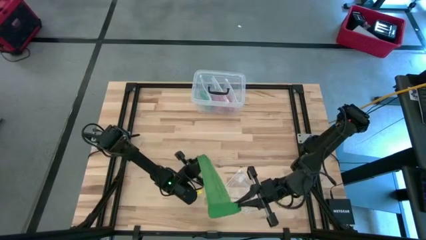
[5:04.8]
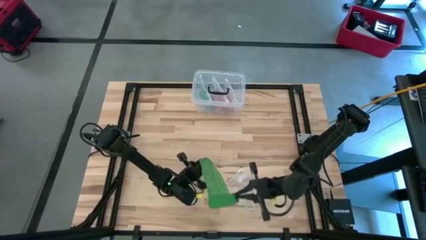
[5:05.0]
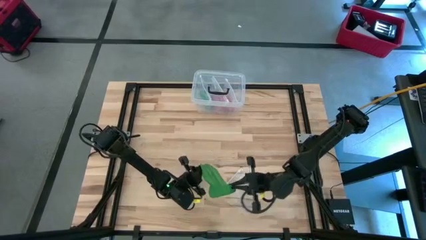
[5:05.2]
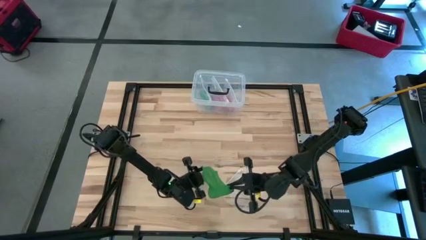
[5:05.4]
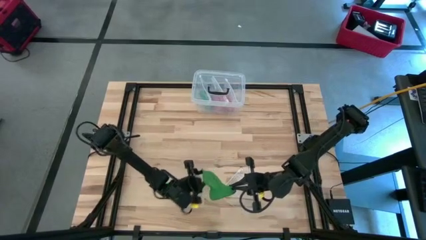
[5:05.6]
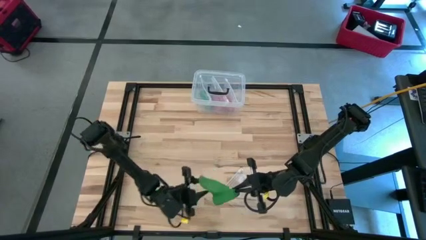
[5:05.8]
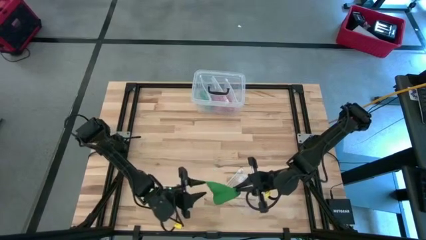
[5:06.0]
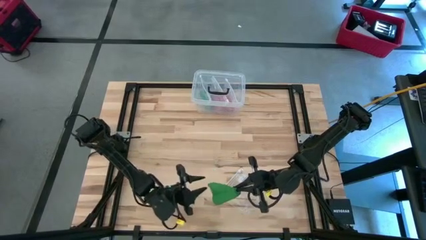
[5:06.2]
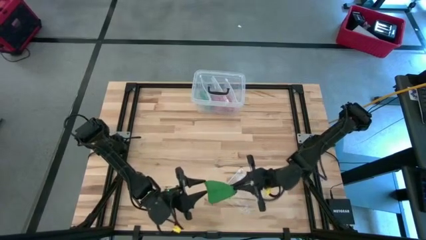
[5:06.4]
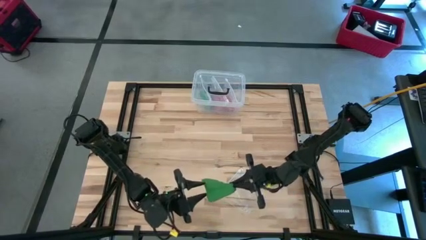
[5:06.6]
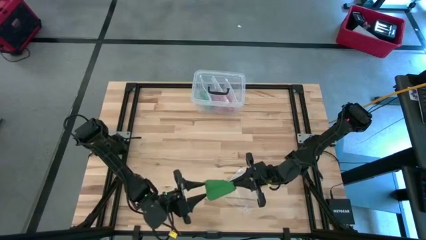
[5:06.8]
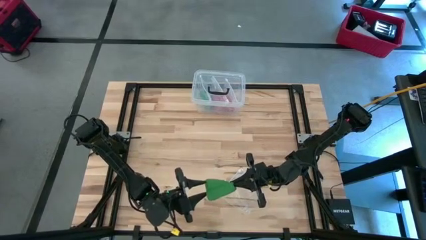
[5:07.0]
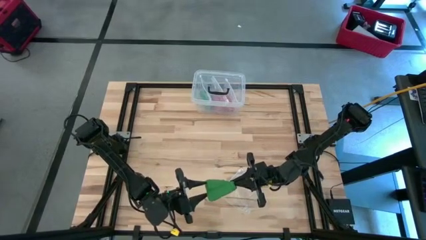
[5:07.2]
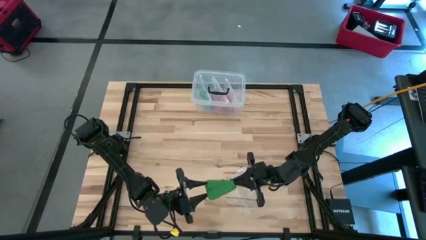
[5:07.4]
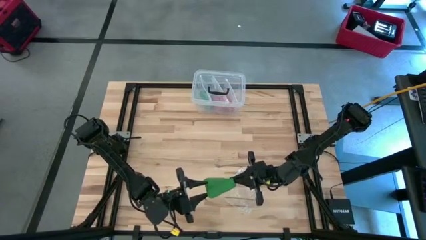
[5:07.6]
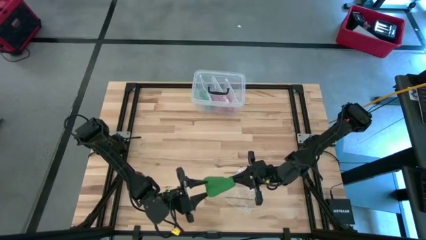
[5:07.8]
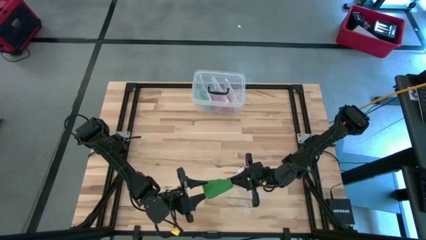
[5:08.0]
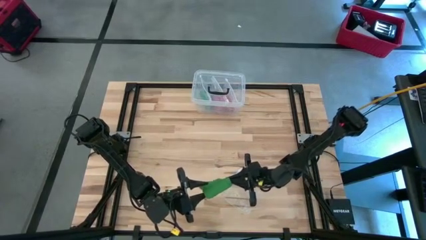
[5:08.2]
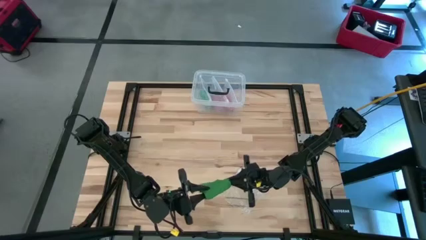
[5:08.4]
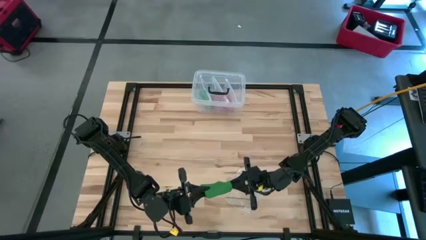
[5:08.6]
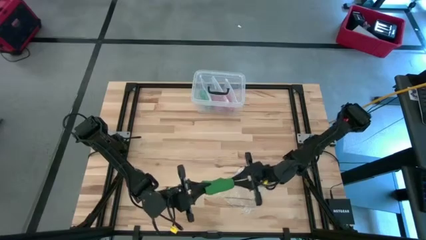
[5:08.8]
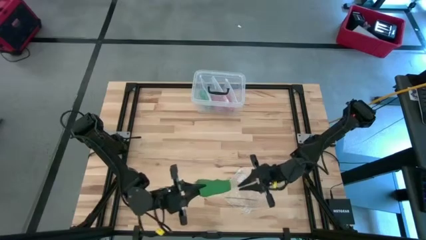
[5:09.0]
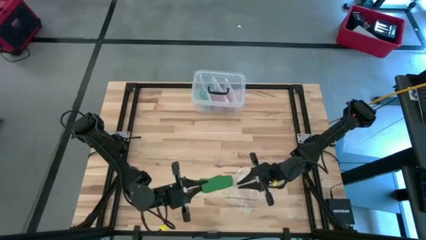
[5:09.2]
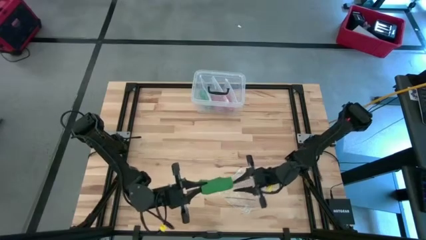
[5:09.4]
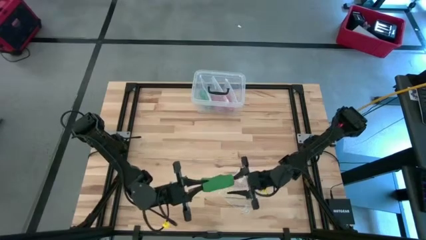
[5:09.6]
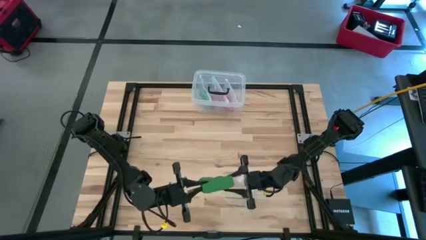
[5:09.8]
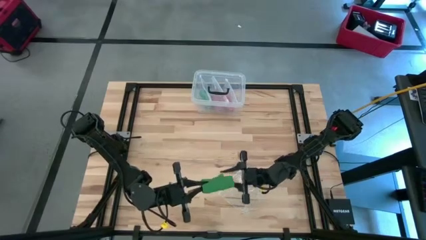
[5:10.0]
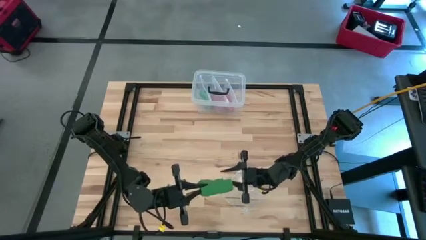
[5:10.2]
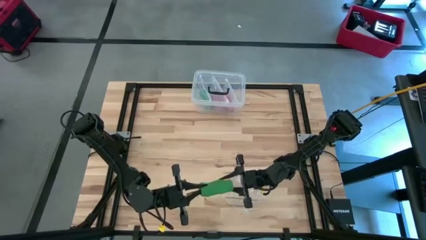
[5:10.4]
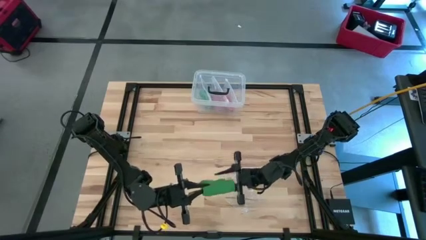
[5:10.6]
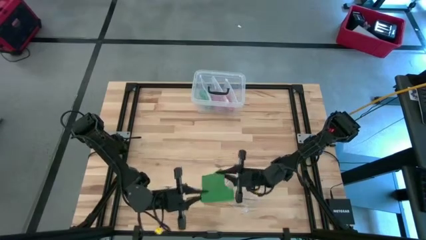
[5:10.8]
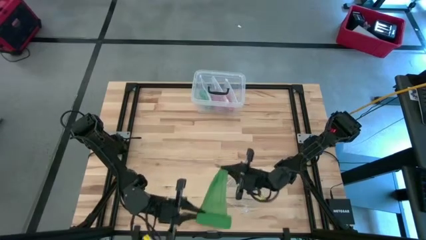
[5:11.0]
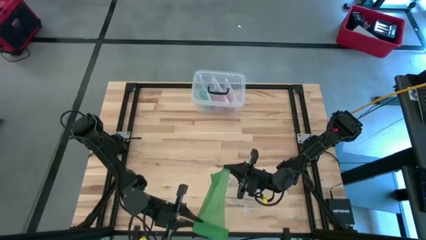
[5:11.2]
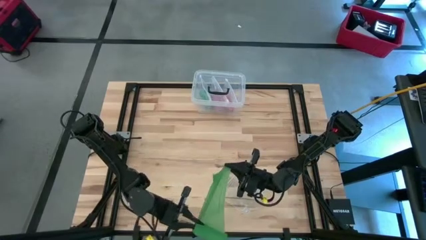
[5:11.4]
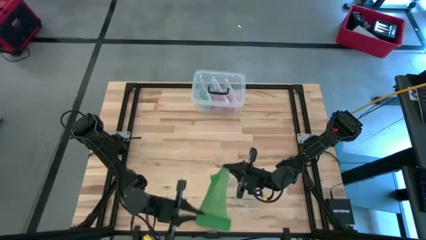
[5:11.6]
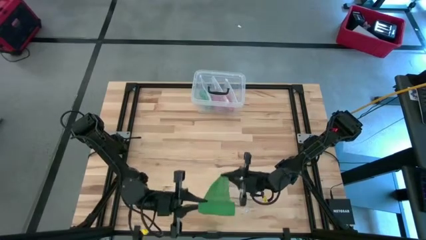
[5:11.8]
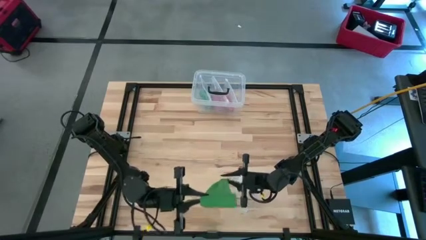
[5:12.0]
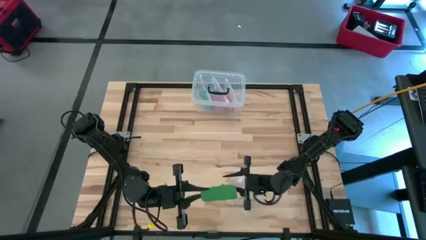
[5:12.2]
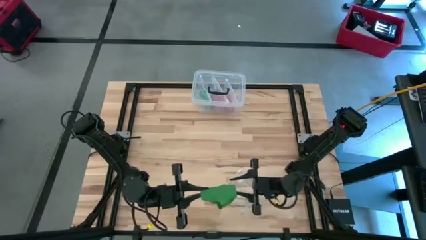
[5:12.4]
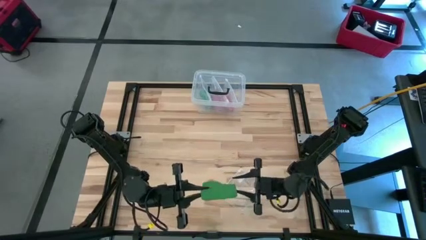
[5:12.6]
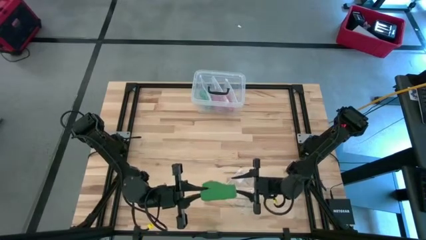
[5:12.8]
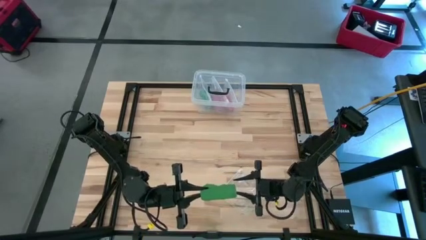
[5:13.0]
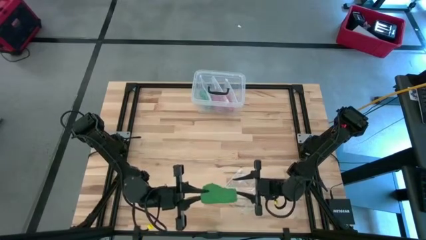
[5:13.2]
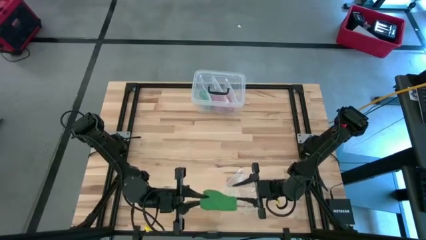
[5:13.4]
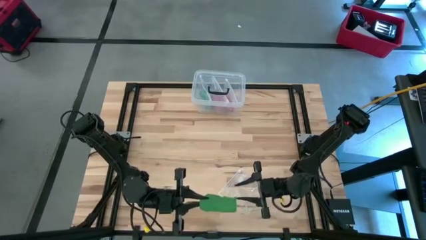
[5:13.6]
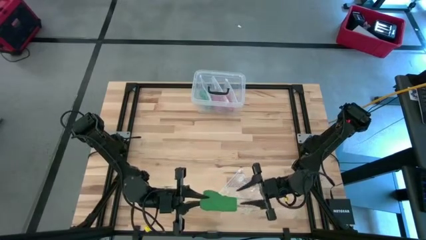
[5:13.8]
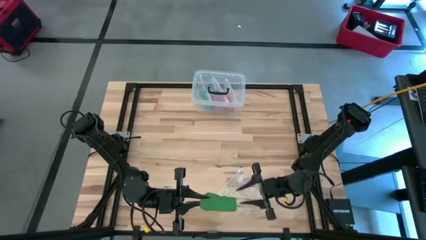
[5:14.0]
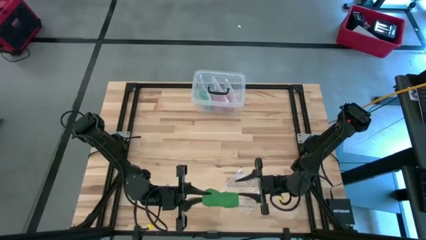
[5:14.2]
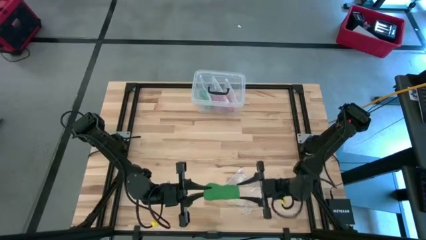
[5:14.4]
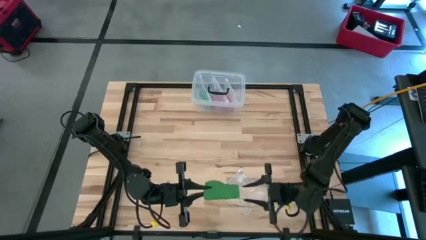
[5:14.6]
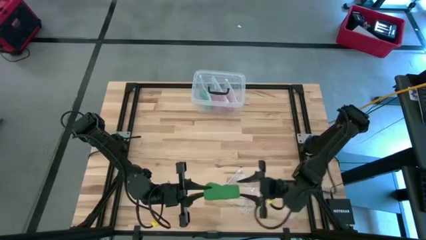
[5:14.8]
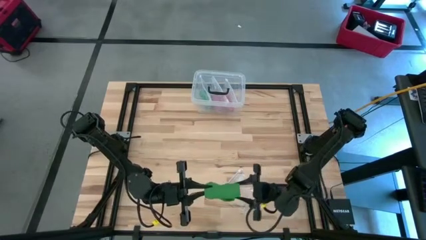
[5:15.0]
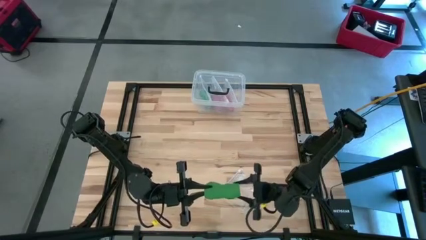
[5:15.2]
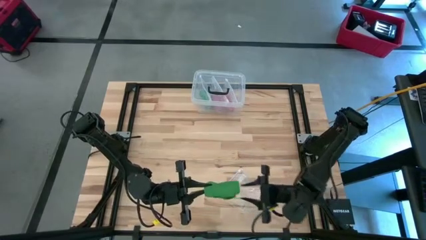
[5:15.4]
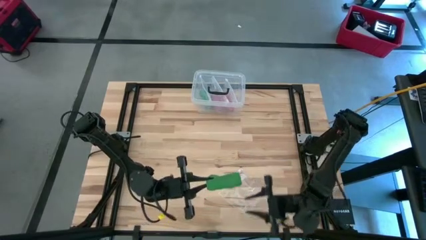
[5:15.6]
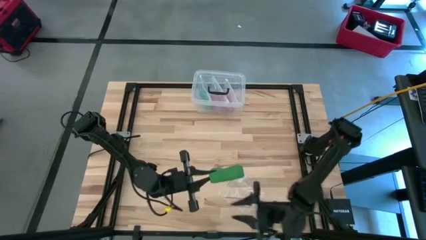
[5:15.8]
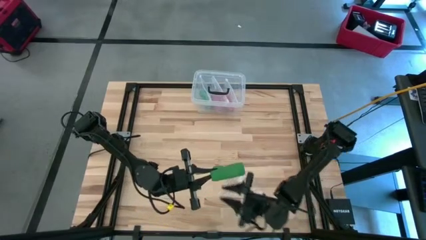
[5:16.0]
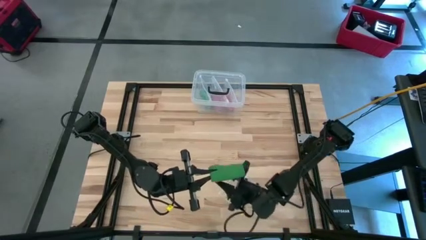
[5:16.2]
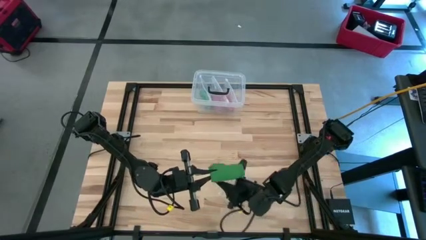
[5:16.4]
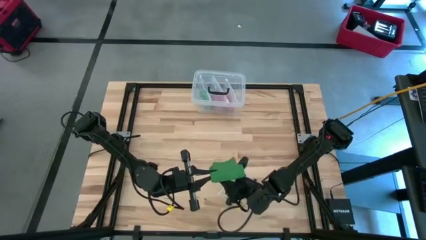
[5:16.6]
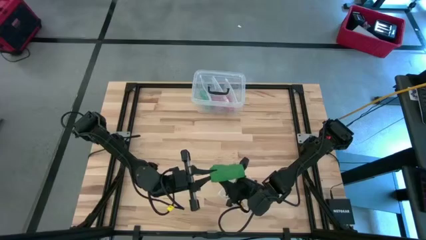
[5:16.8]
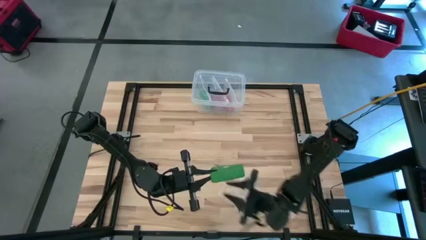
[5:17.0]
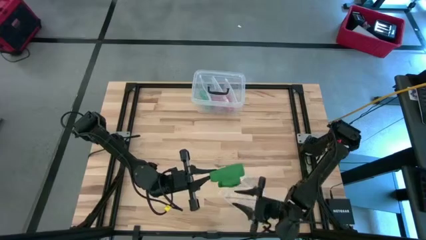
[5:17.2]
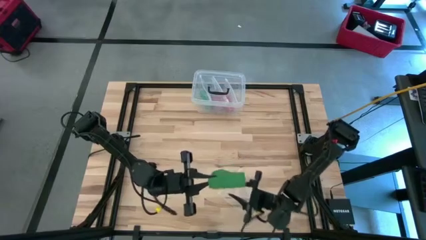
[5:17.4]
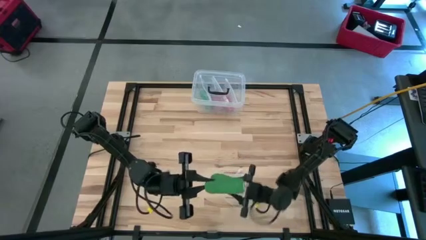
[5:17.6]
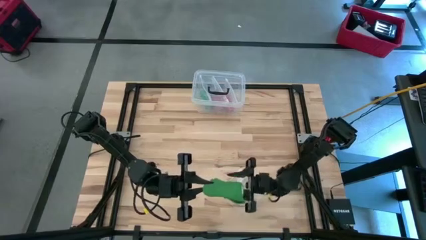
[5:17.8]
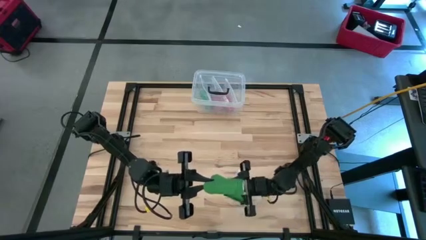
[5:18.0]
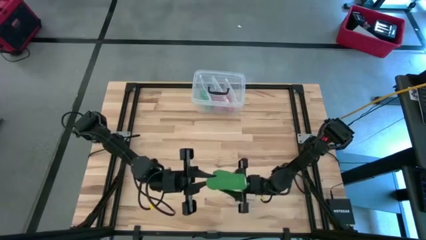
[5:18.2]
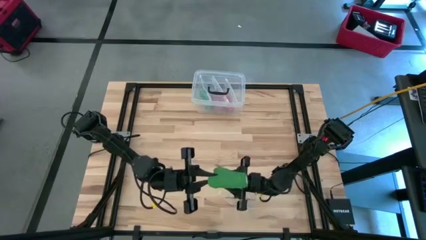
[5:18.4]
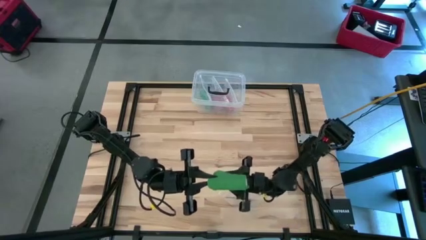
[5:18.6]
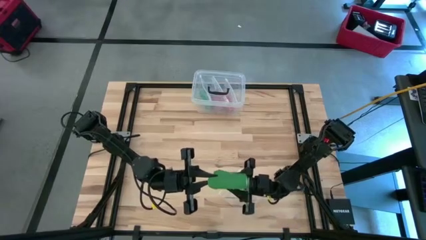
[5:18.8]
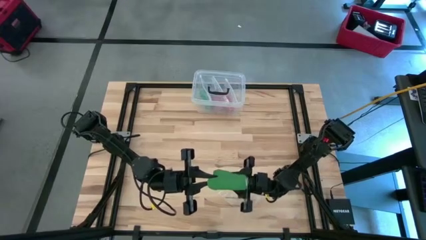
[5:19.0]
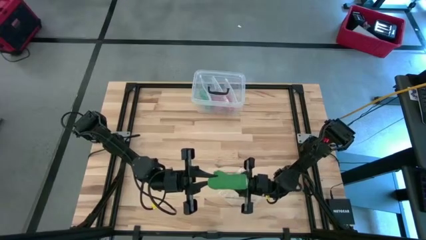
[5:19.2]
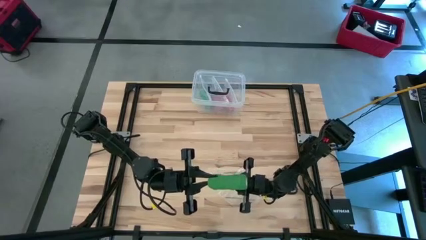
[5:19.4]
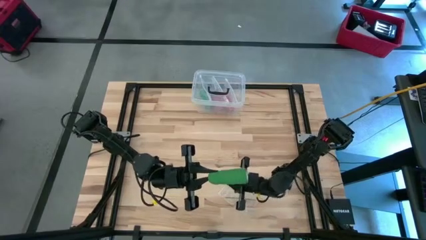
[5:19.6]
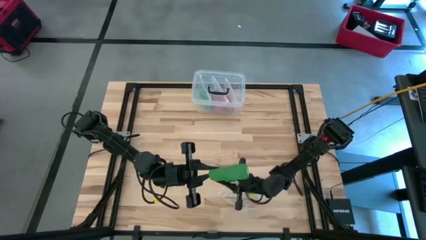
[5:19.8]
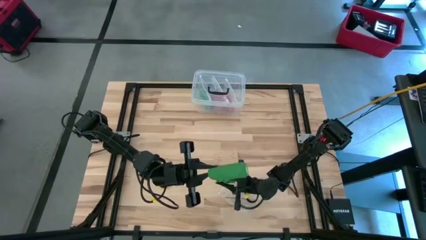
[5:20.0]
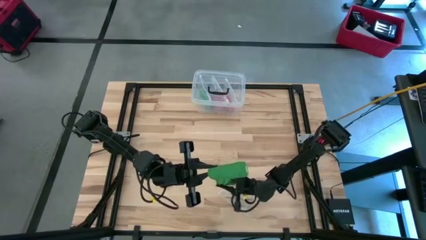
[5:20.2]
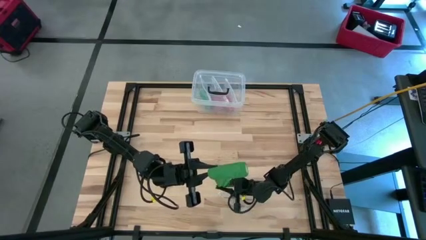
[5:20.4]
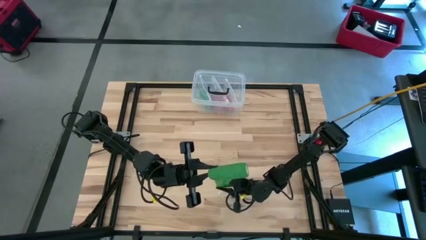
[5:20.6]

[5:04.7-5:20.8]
Task: Roll bandage
Roll the green bandage
